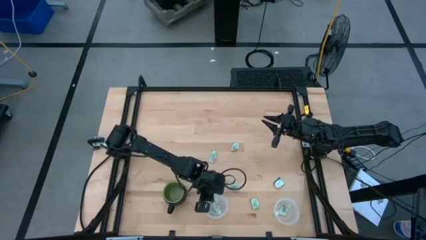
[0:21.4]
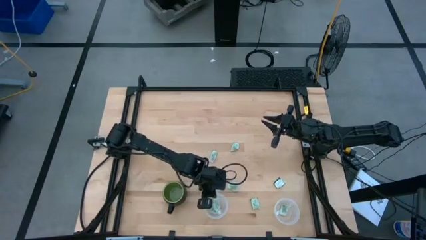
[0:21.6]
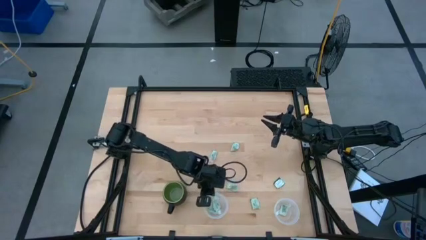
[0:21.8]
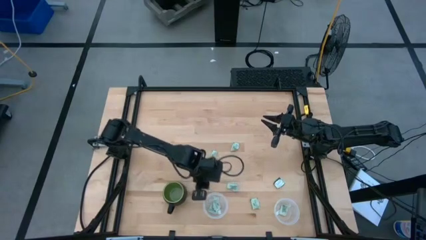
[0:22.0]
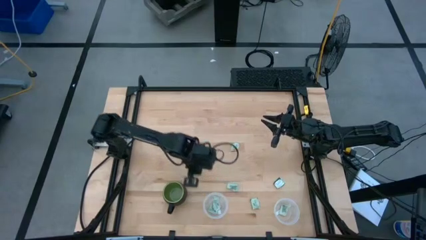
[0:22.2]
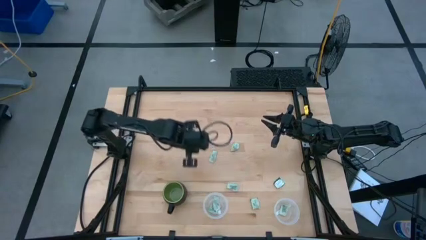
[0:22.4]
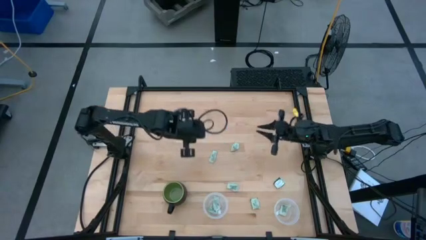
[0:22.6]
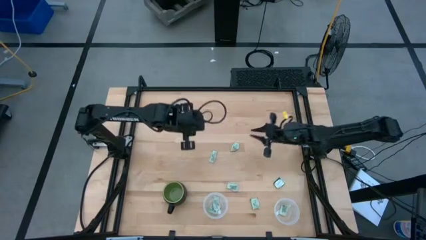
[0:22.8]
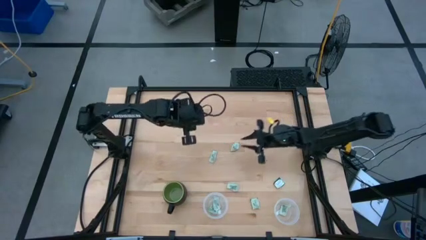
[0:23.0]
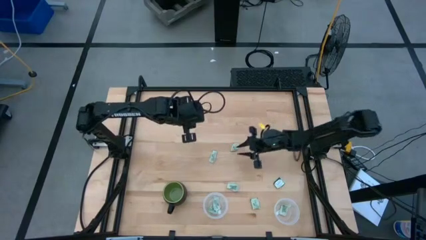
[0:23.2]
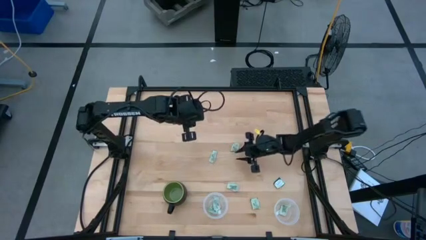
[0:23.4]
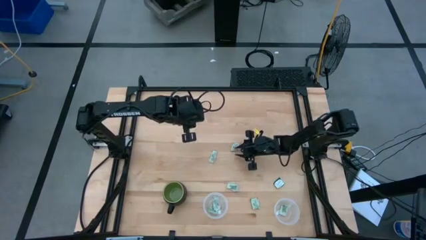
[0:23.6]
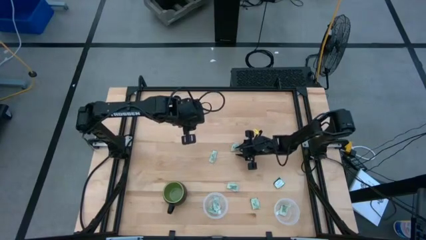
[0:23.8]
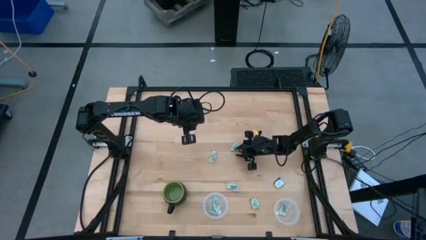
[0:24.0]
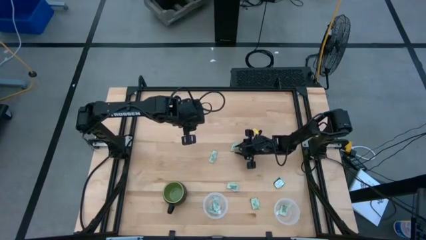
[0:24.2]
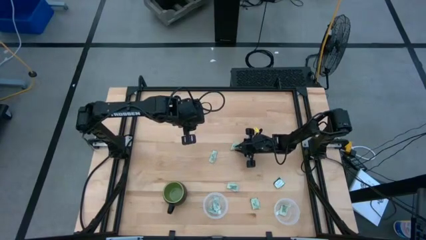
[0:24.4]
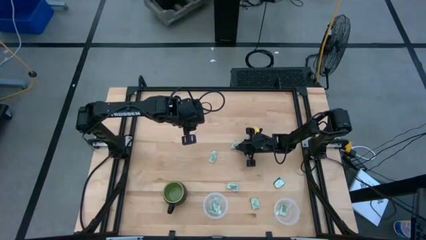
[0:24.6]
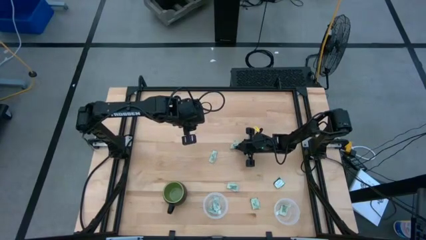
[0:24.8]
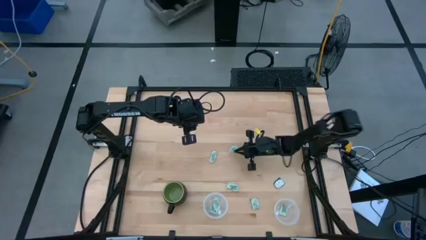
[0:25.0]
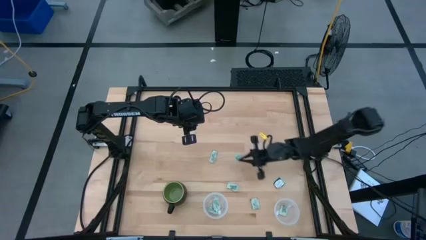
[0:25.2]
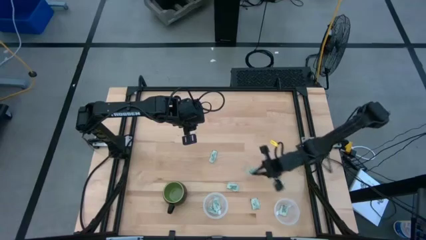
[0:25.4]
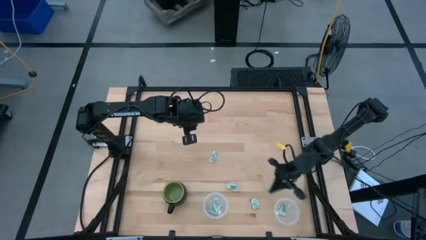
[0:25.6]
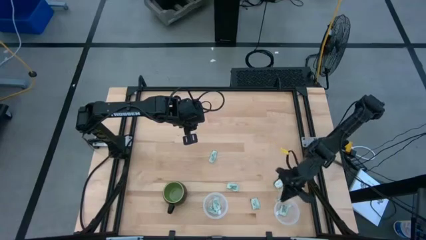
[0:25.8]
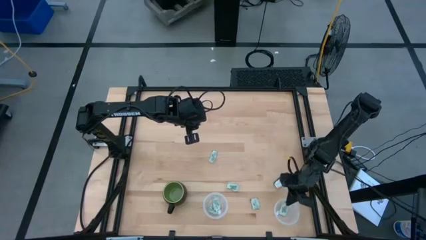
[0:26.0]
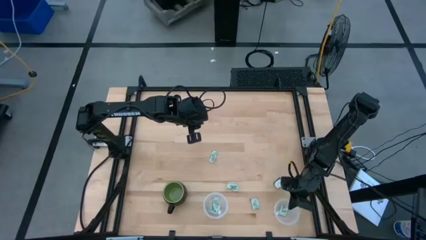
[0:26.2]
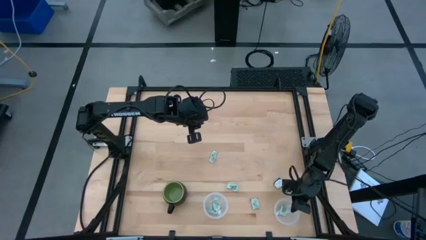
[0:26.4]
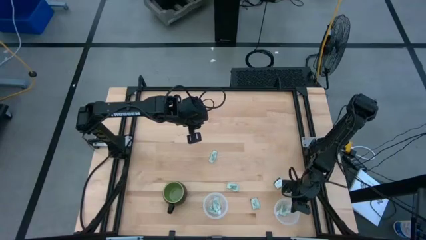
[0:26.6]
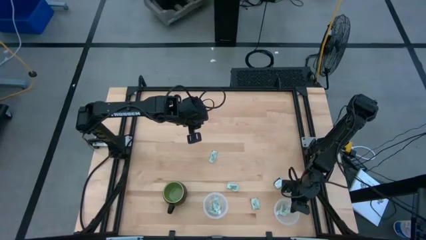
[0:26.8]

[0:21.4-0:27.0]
Task: Pick and place Stevia / Truvia into bins
Put the green stevia packet into the right transparent container

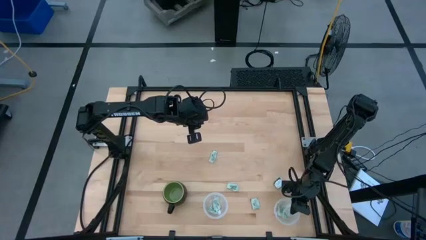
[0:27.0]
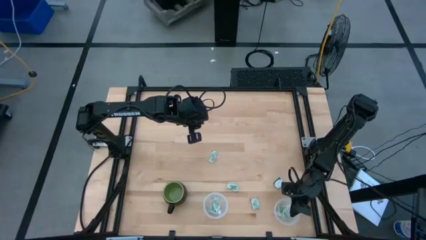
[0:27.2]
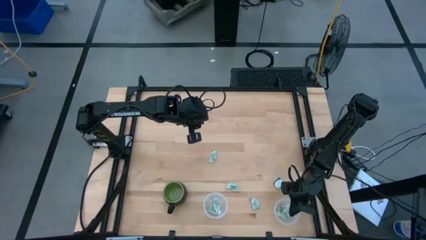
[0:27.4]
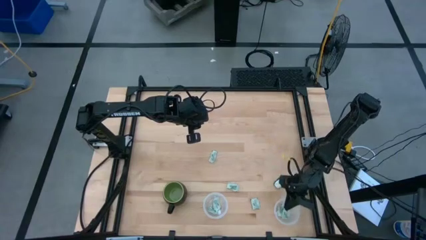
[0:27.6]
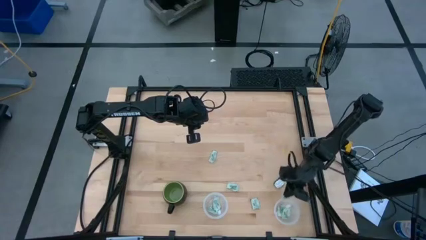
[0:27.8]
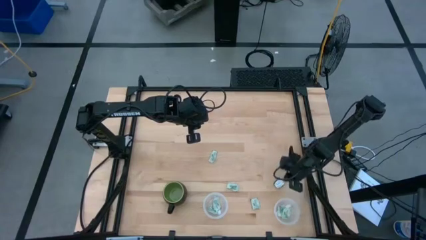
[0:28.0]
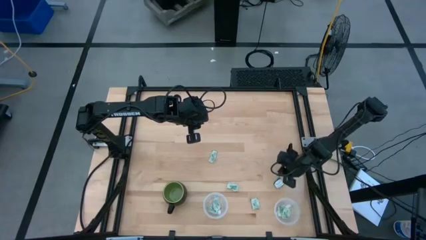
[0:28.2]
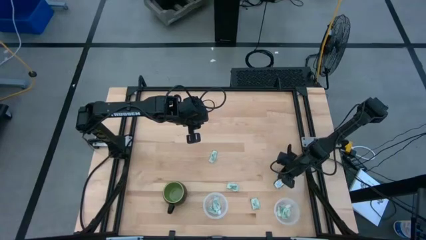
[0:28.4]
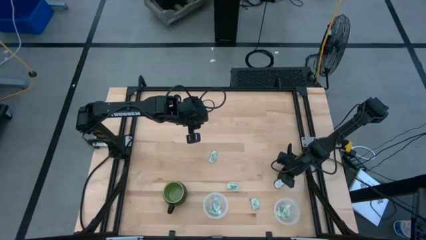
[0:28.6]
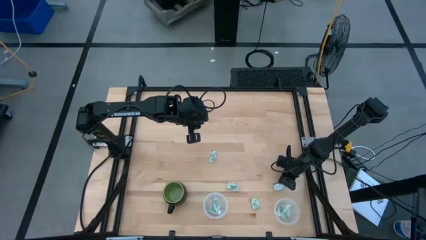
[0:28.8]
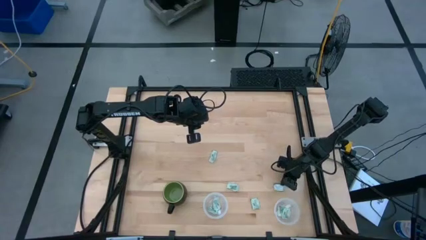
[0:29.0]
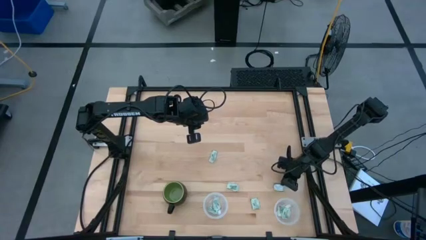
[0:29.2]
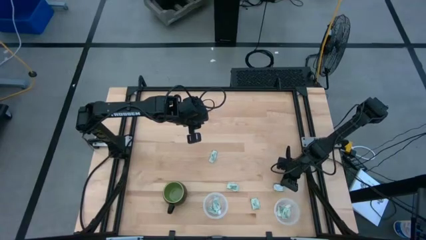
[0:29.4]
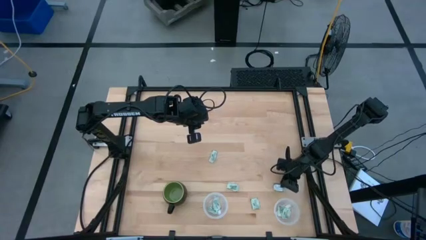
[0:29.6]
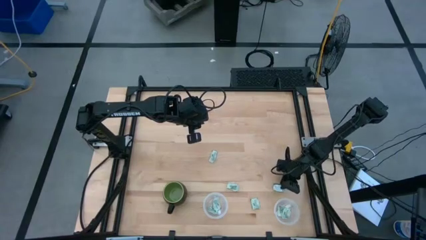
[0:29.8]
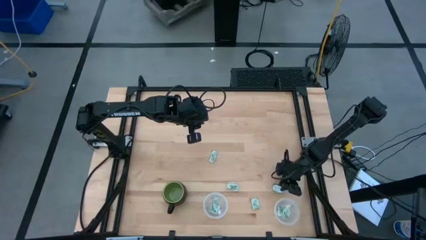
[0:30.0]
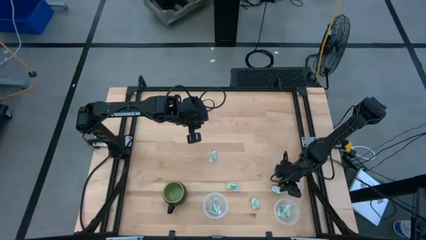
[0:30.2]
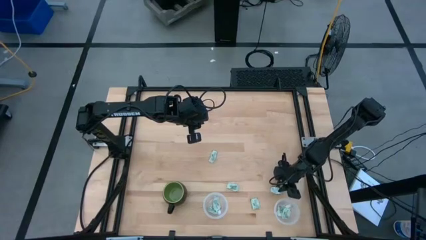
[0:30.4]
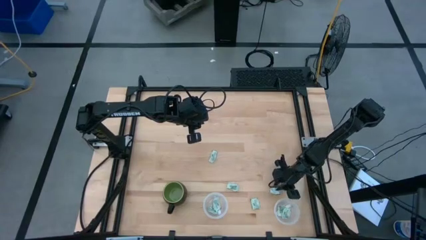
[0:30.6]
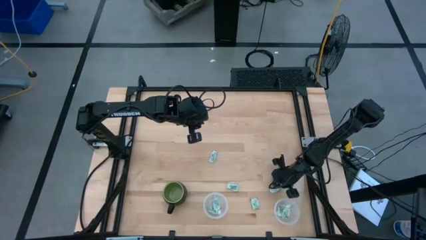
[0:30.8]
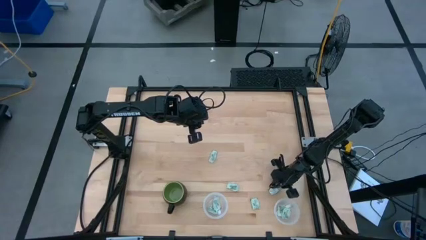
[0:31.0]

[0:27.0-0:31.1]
Put the dark green truvia packet into the right transparent container

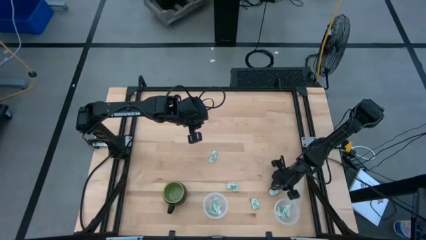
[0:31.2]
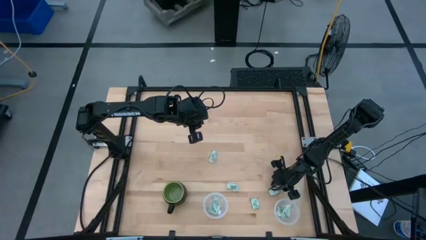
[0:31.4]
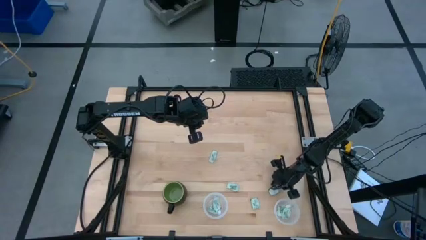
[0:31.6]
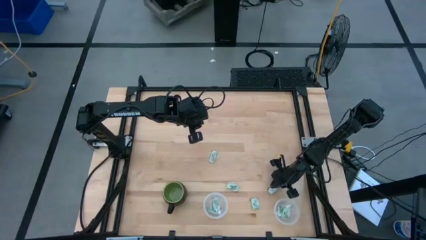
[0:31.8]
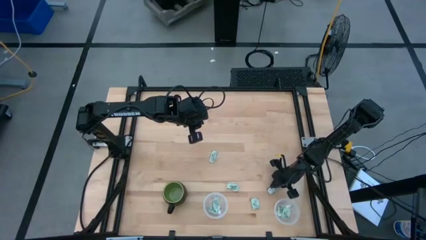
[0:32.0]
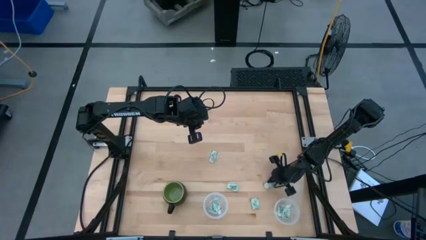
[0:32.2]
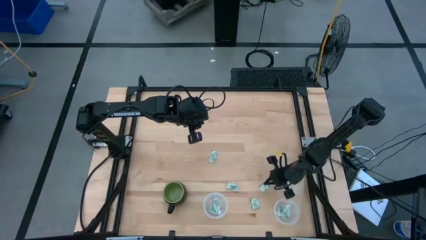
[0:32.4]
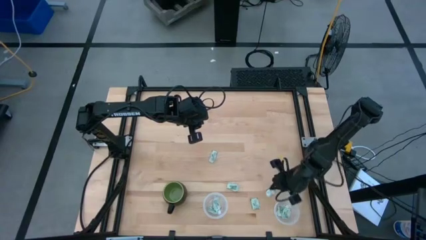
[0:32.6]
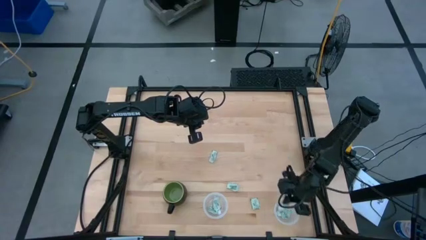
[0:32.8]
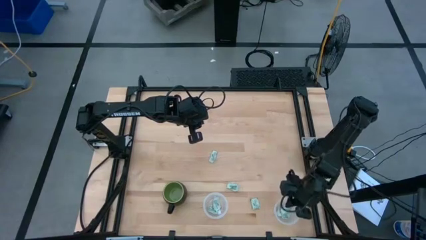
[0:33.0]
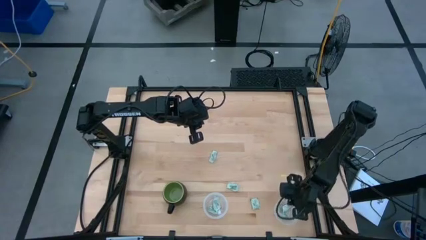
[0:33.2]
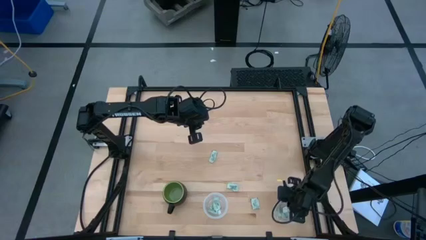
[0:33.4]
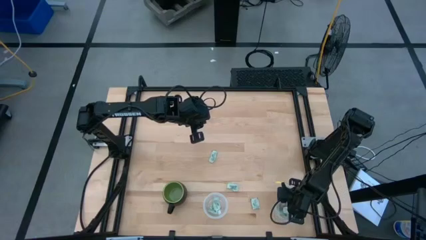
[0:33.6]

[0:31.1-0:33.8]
Put the dark green truvia packet into the right transparent container

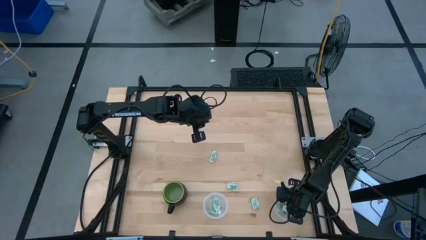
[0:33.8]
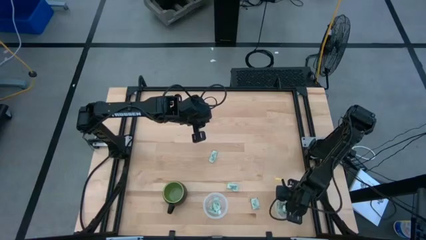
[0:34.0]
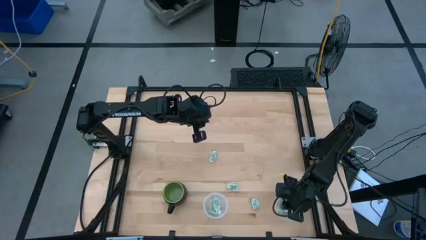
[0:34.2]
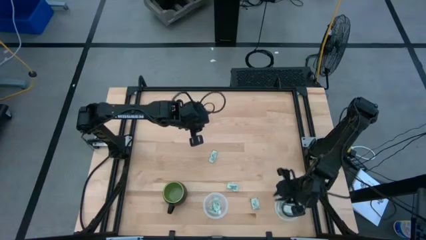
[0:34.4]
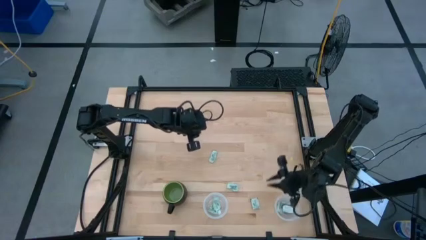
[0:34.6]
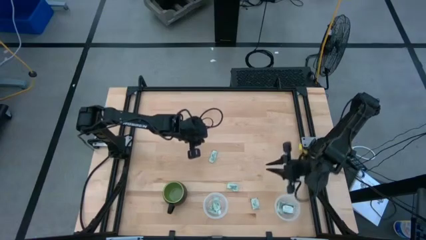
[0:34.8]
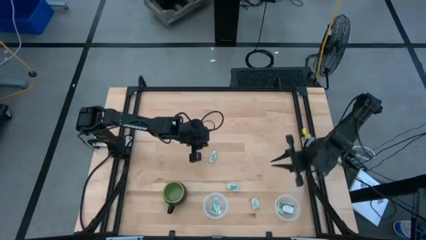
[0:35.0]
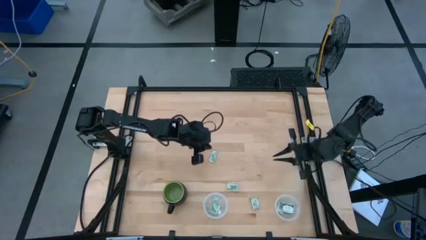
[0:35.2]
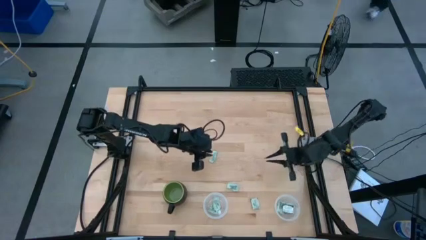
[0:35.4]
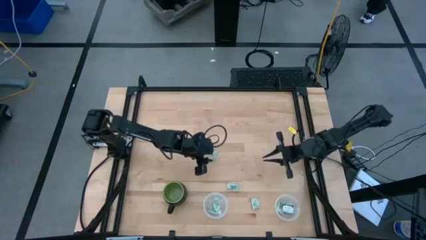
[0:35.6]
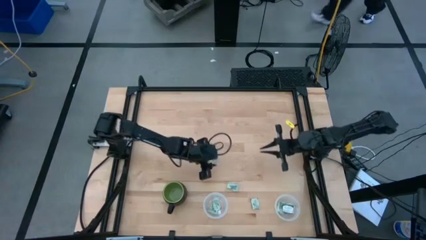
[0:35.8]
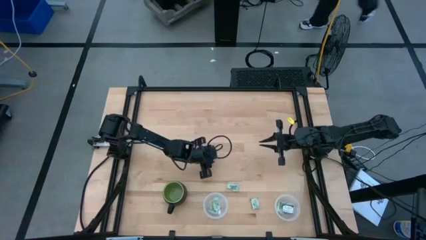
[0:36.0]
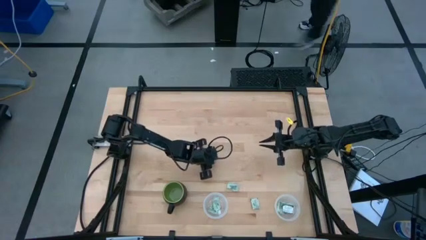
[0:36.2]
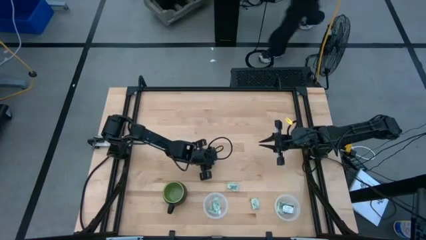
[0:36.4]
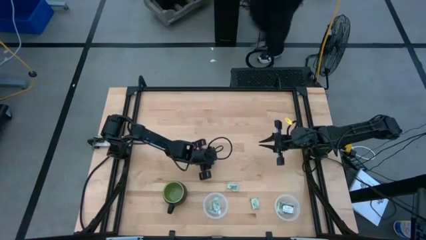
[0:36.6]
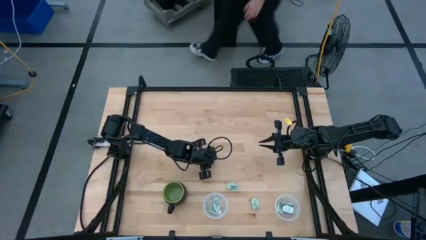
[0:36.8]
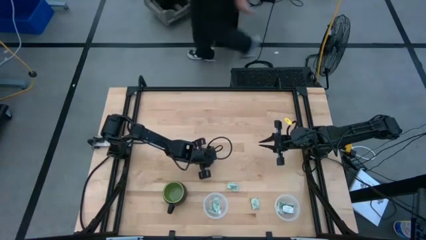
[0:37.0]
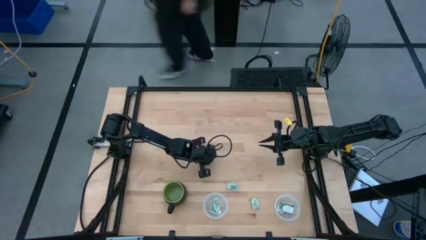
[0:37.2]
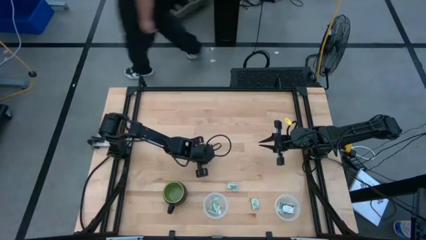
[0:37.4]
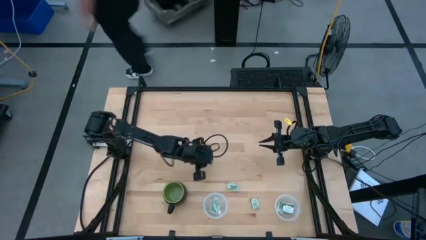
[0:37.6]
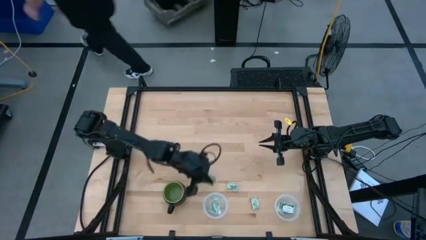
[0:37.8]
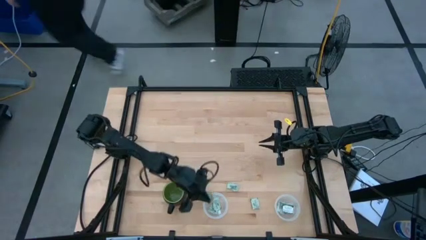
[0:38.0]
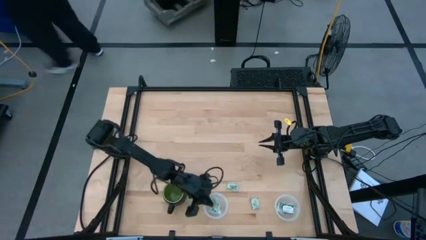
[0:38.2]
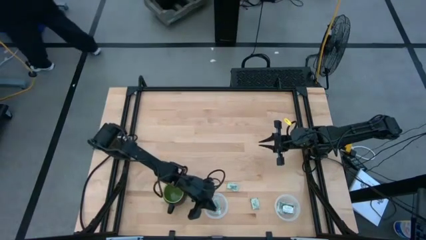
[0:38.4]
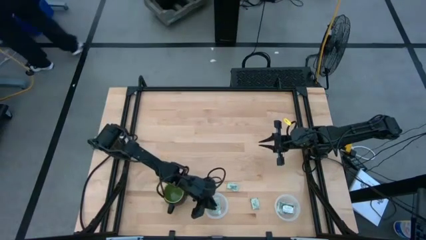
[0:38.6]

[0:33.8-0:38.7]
Put the green stevia packet into the left transparent container
